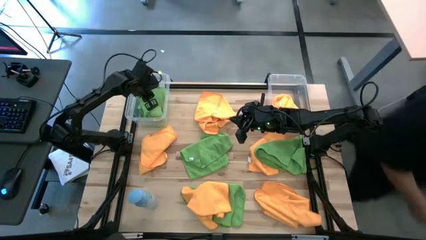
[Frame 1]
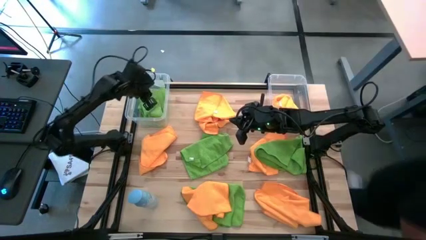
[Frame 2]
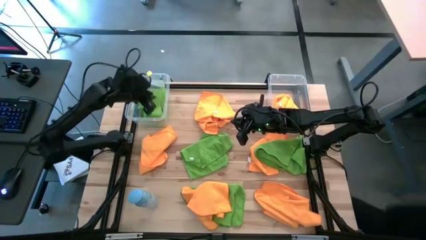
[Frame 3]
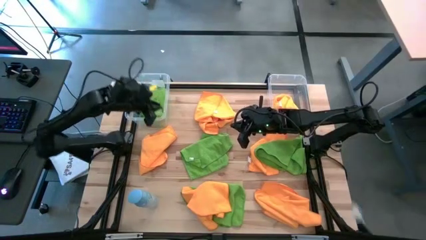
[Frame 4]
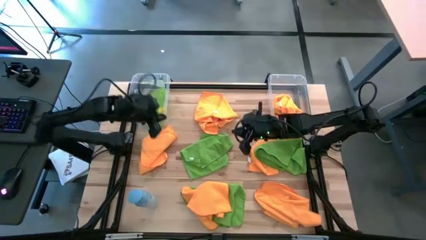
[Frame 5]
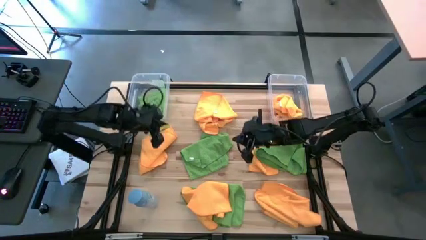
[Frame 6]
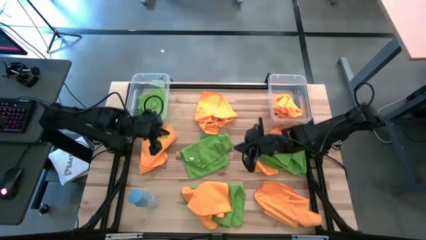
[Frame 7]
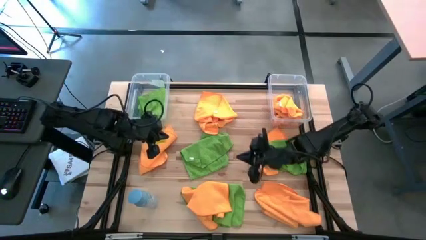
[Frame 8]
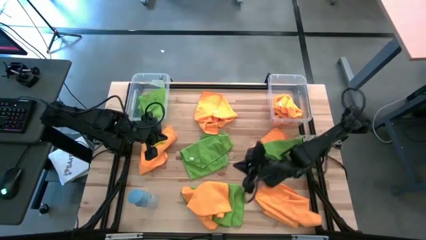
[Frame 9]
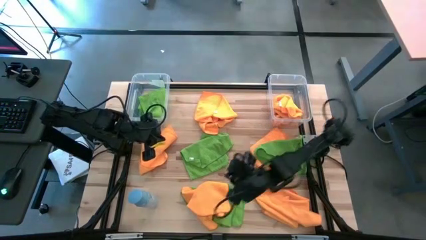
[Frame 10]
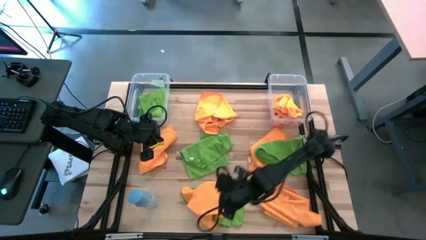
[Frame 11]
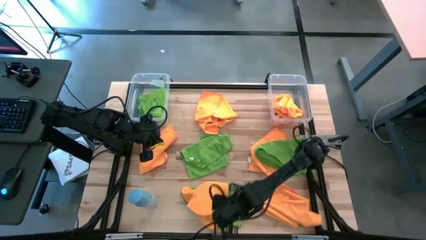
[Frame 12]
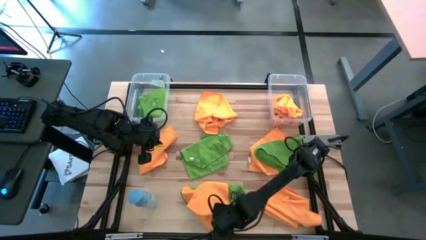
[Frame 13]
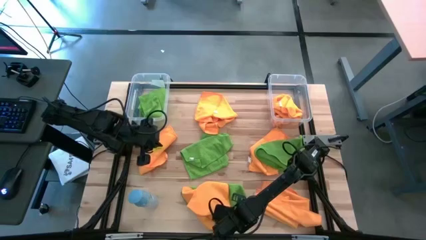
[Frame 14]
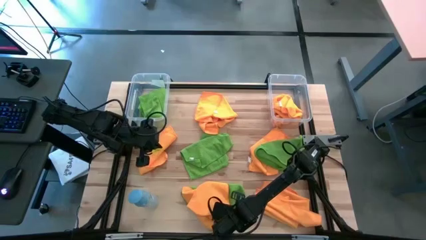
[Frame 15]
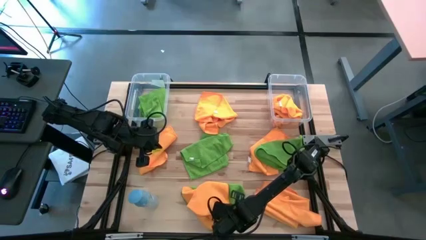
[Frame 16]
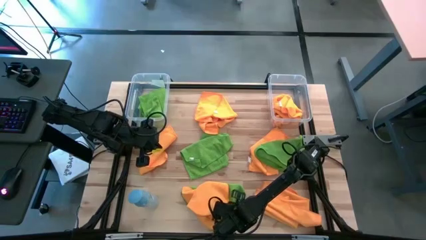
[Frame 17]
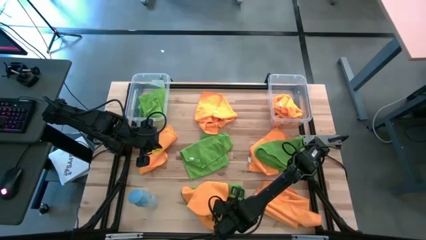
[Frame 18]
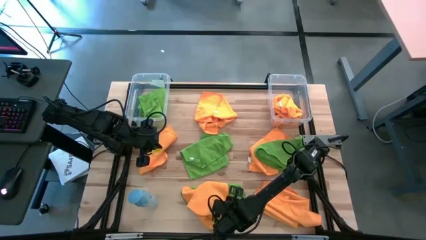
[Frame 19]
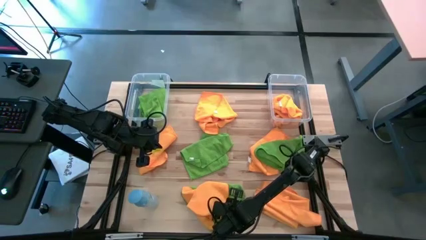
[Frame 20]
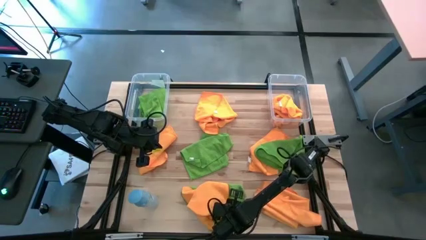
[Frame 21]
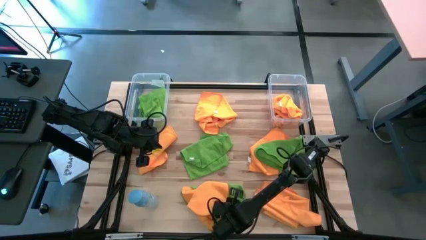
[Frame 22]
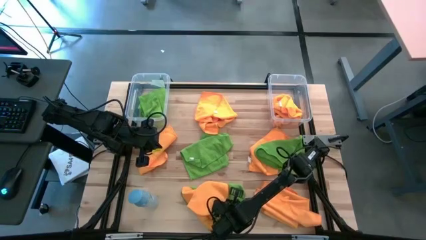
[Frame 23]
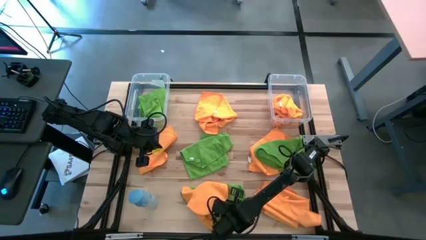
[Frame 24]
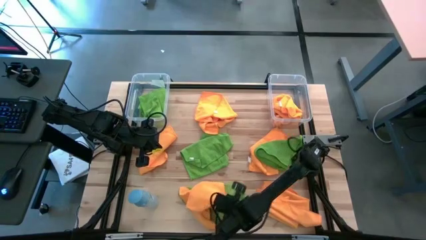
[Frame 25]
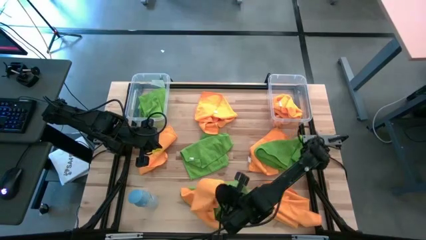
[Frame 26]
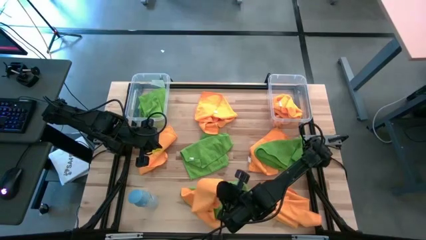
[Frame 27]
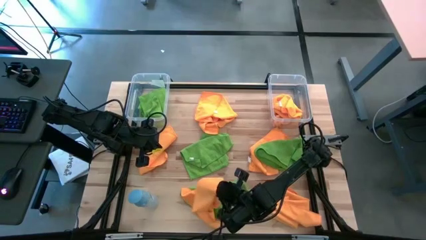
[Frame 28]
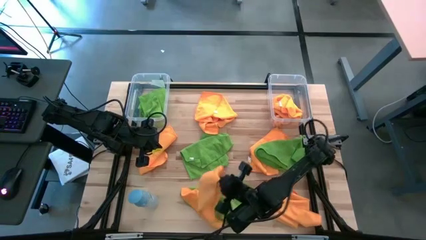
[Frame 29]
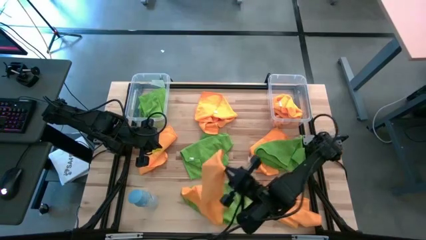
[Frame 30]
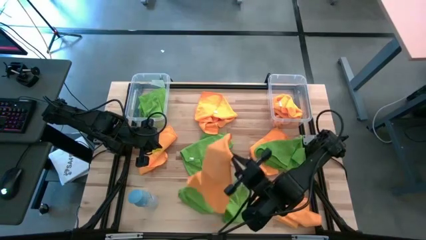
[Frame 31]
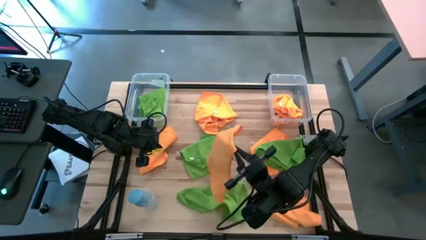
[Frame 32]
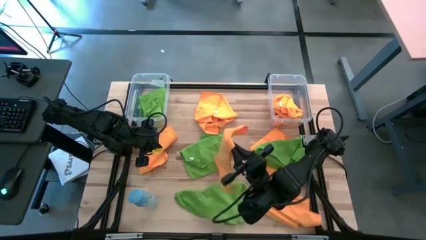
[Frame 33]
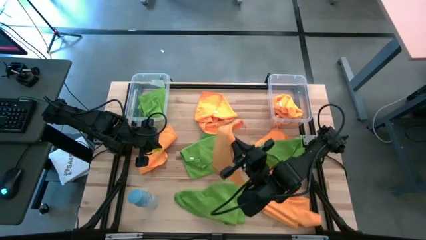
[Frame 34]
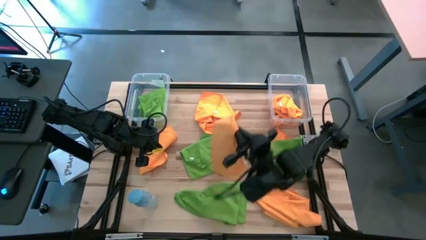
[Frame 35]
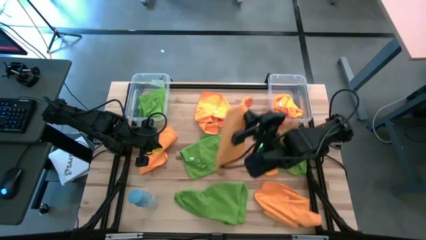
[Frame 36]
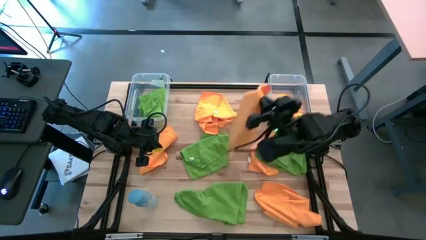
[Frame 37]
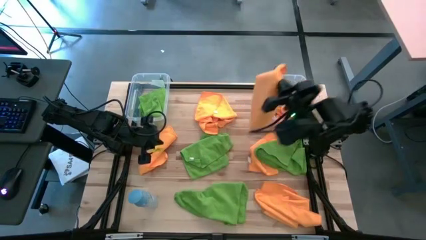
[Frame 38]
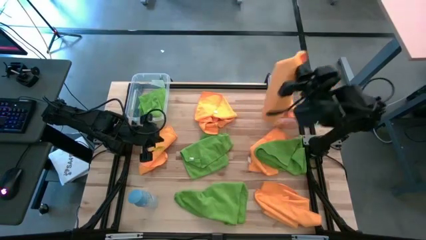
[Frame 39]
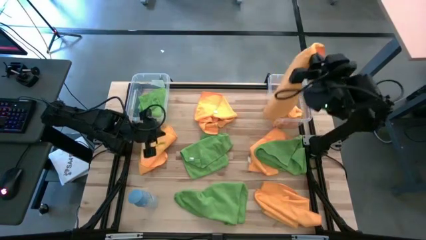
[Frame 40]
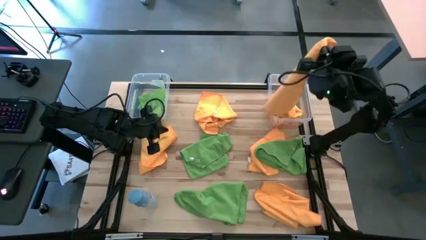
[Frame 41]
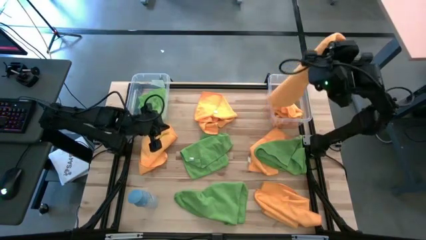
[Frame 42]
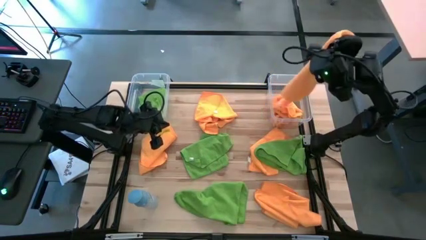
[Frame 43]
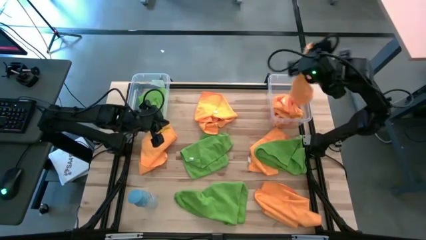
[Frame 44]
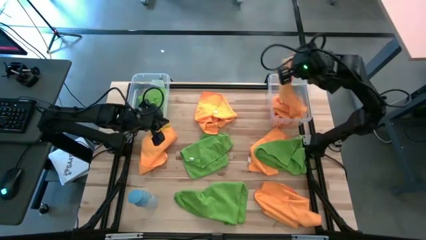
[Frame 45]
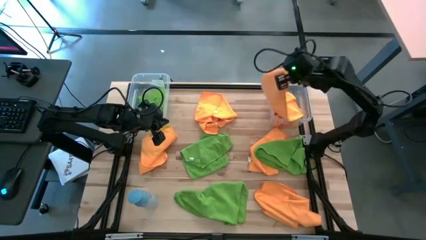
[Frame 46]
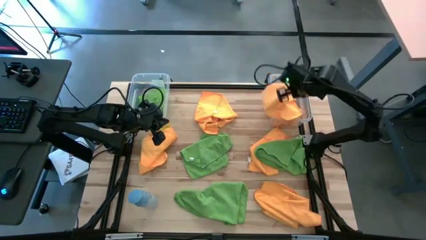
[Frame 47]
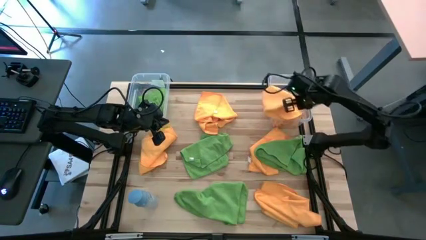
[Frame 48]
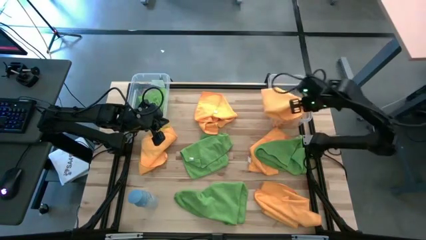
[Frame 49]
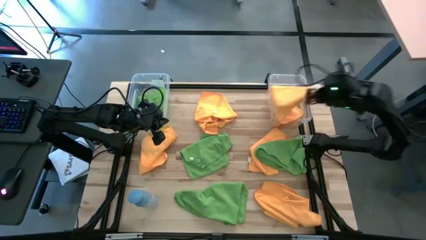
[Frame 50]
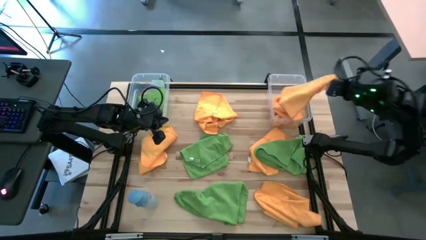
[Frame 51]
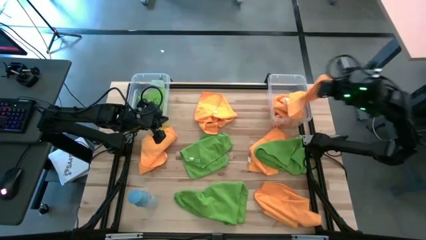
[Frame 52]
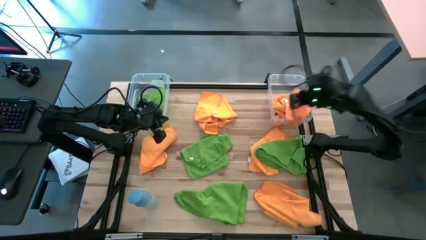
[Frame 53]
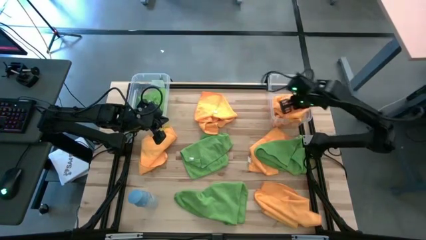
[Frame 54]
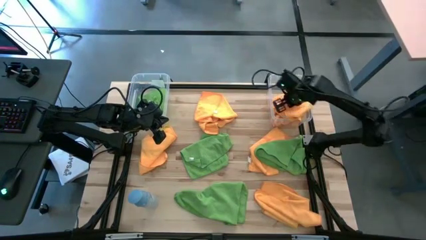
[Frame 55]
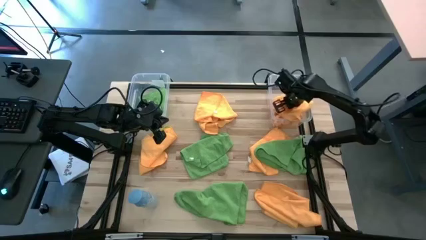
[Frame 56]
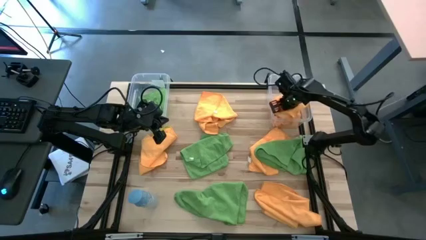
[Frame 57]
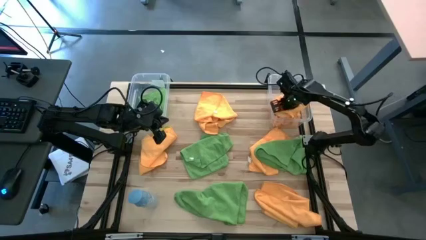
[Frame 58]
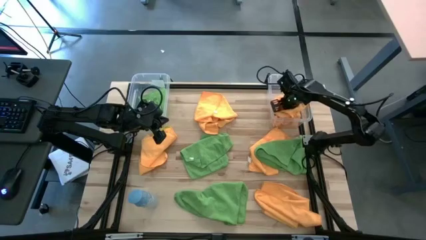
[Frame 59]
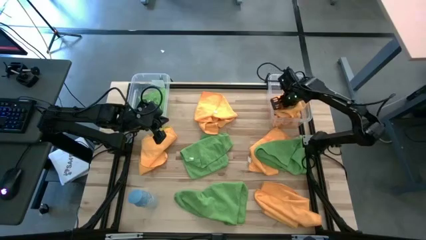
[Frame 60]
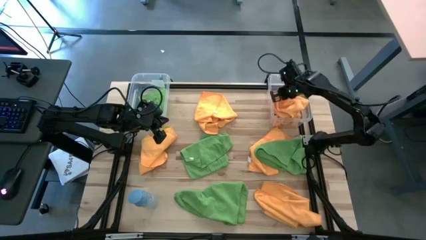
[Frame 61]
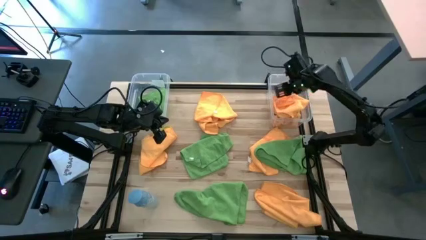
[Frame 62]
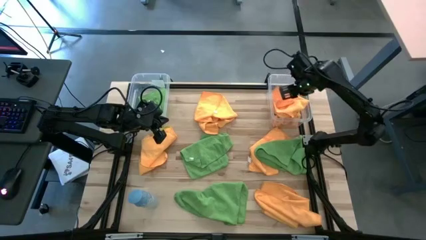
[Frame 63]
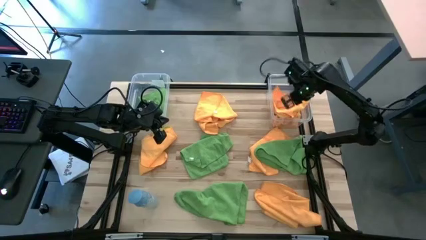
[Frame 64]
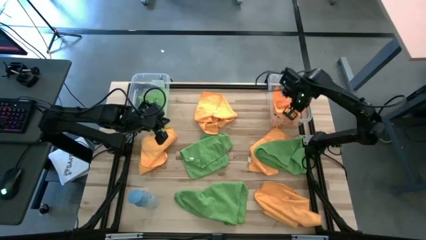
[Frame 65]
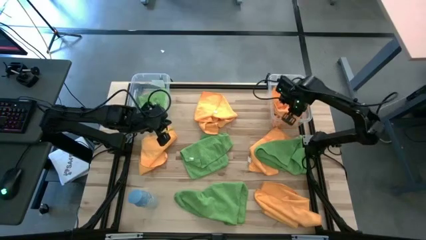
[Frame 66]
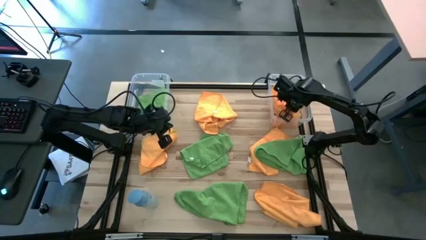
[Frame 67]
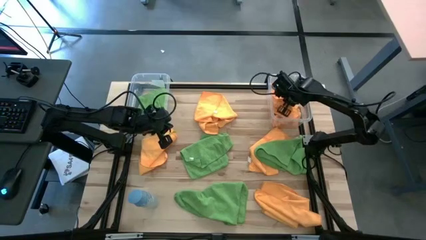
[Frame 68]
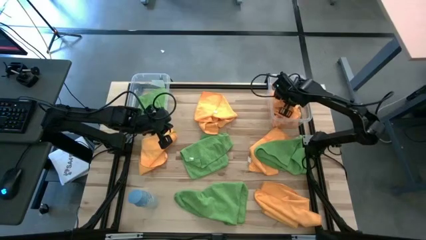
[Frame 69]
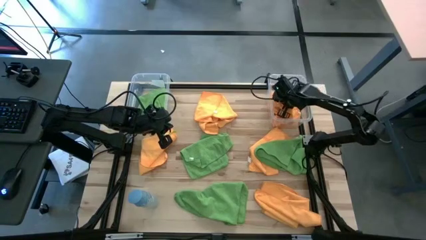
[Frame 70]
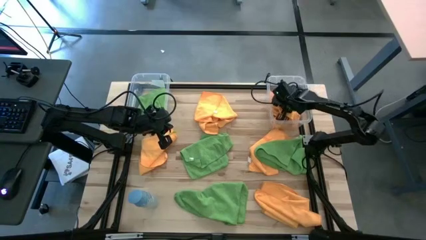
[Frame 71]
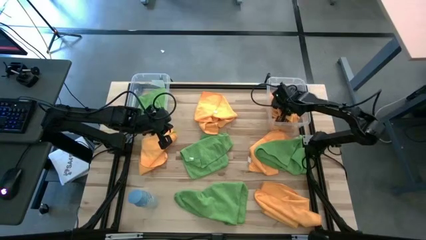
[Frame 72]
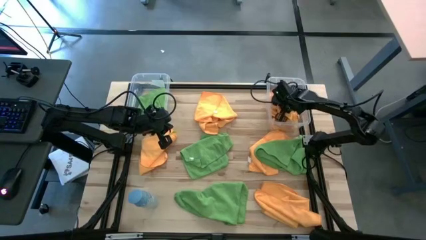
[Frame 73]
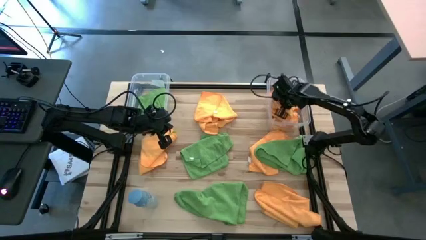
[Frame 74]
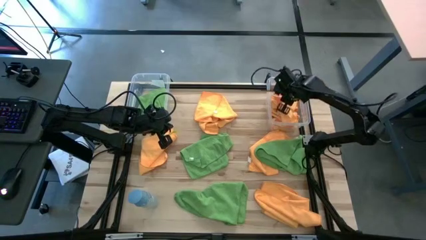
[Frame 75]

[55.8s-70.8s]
Task: Sort microfiber towel by color & place in baskets
Put the orange microfiber towel into the right transparent bin
